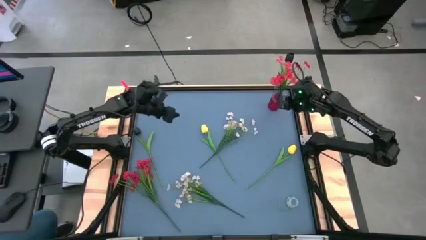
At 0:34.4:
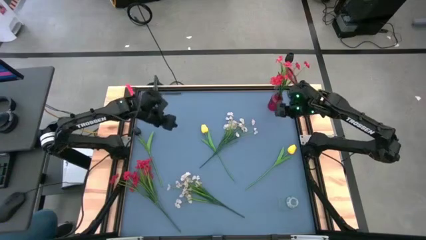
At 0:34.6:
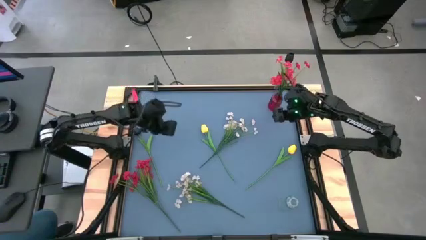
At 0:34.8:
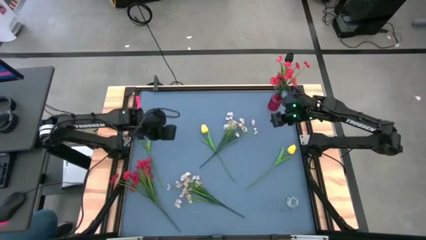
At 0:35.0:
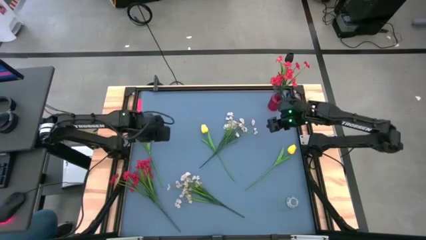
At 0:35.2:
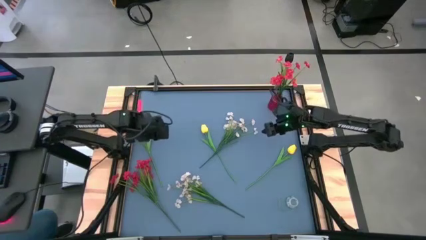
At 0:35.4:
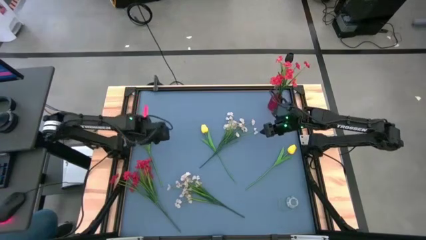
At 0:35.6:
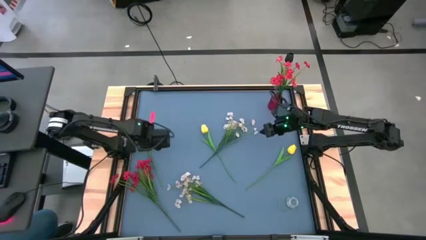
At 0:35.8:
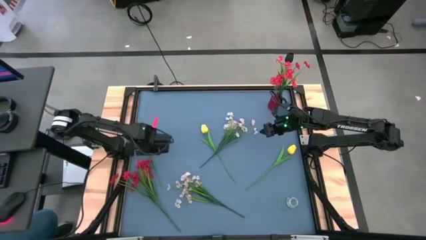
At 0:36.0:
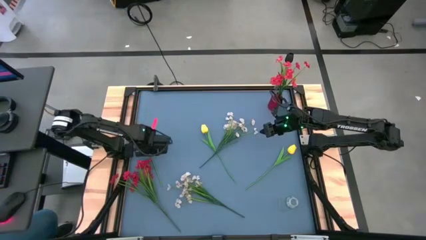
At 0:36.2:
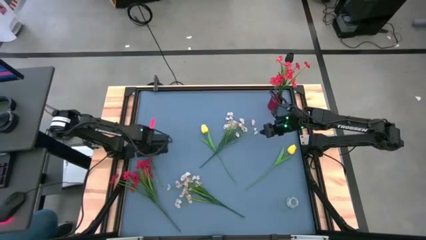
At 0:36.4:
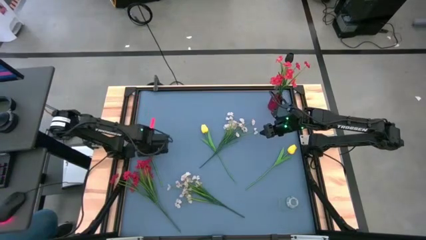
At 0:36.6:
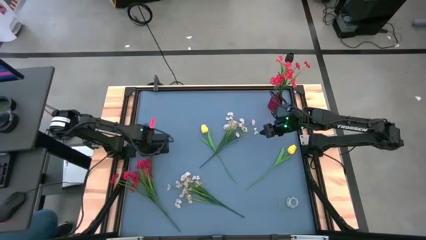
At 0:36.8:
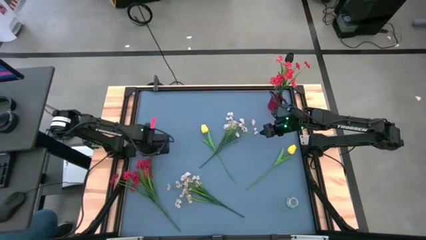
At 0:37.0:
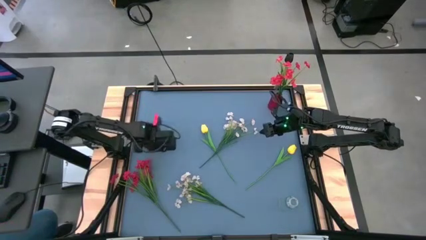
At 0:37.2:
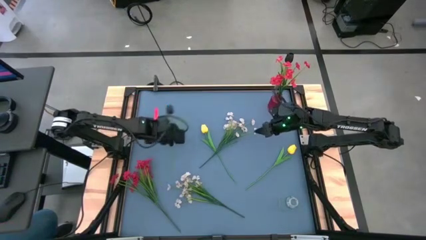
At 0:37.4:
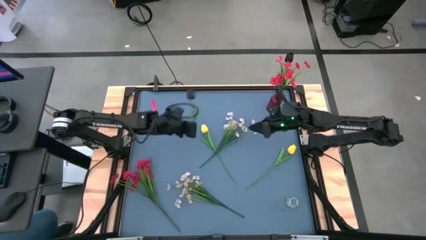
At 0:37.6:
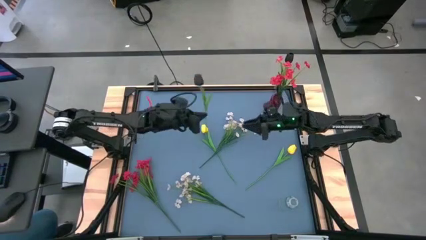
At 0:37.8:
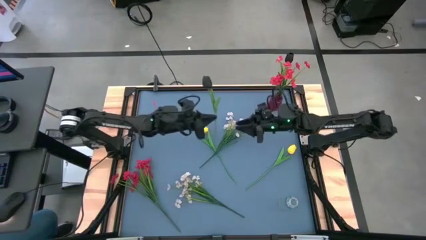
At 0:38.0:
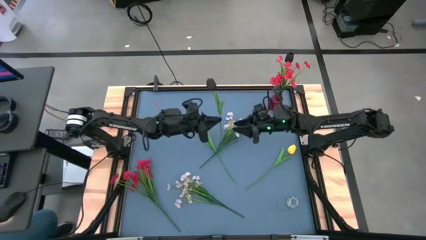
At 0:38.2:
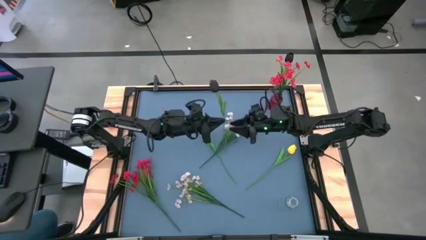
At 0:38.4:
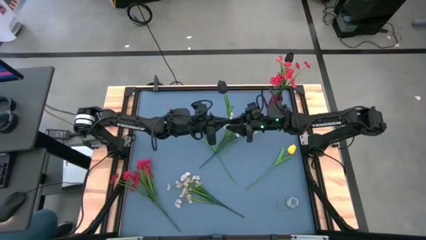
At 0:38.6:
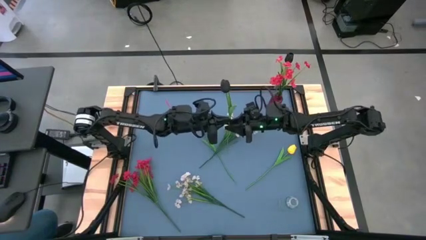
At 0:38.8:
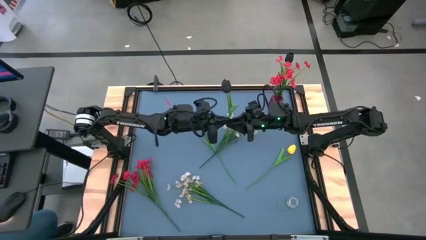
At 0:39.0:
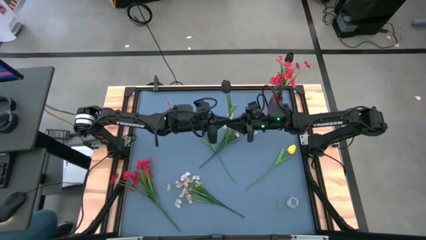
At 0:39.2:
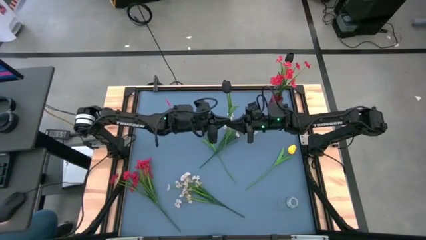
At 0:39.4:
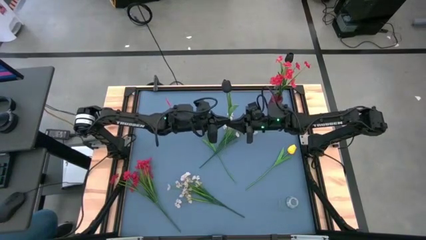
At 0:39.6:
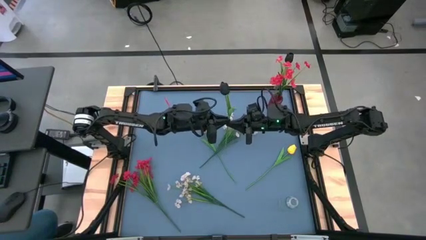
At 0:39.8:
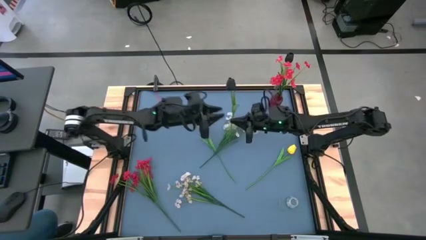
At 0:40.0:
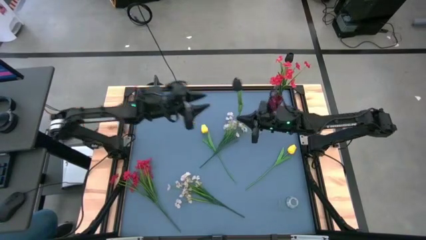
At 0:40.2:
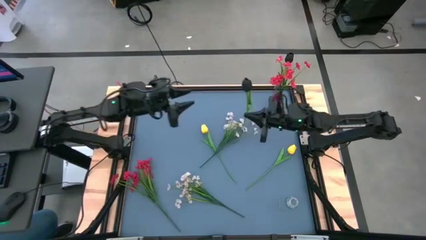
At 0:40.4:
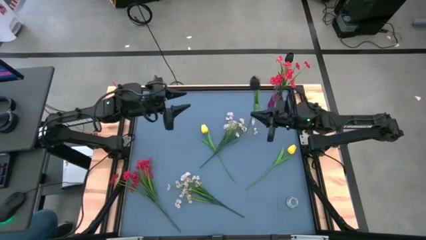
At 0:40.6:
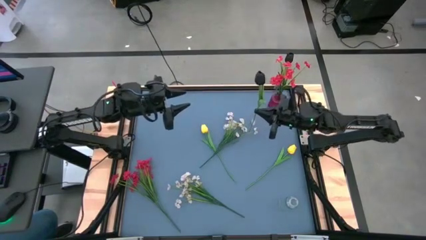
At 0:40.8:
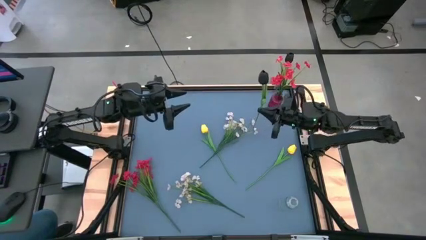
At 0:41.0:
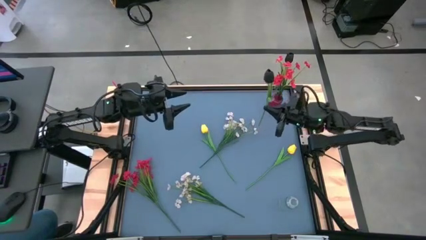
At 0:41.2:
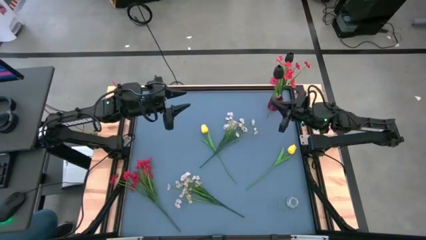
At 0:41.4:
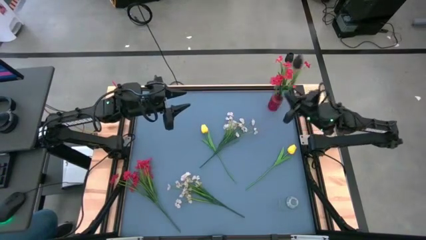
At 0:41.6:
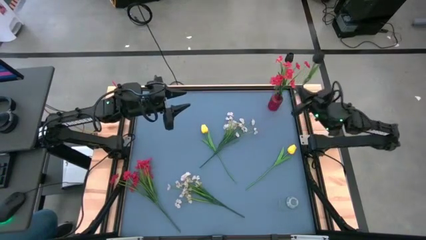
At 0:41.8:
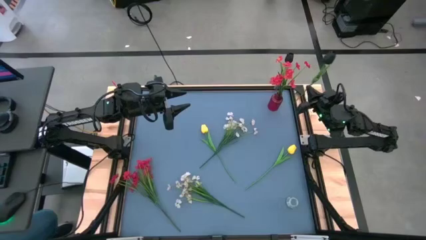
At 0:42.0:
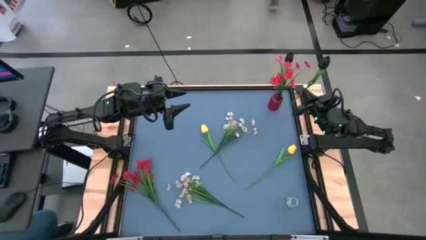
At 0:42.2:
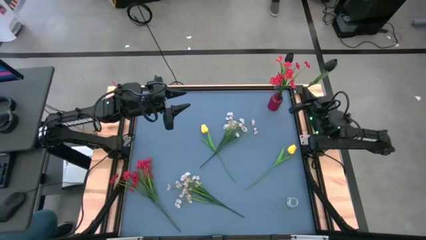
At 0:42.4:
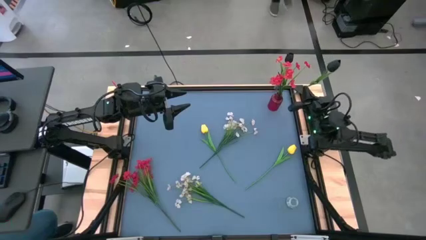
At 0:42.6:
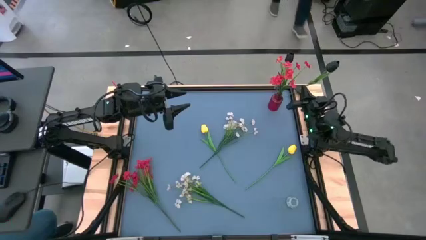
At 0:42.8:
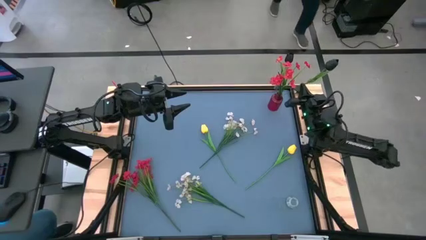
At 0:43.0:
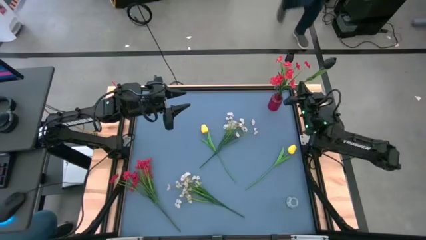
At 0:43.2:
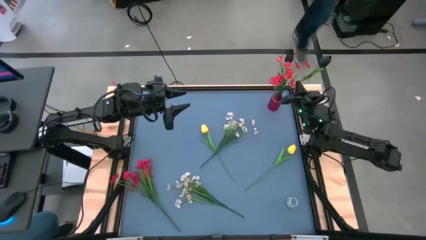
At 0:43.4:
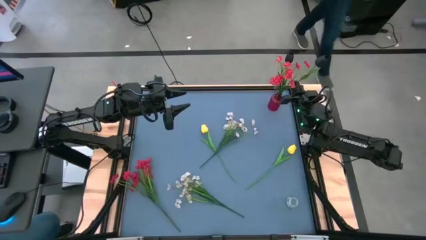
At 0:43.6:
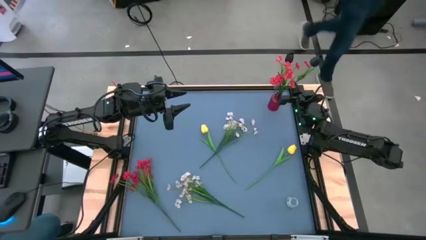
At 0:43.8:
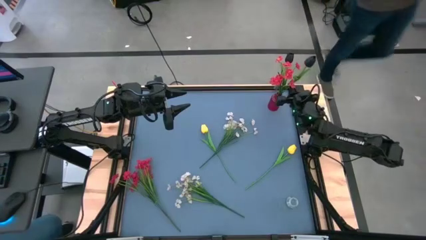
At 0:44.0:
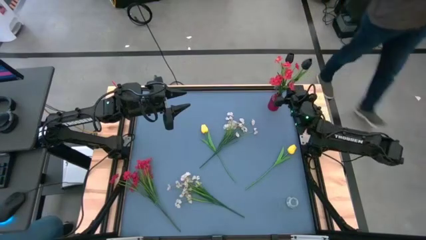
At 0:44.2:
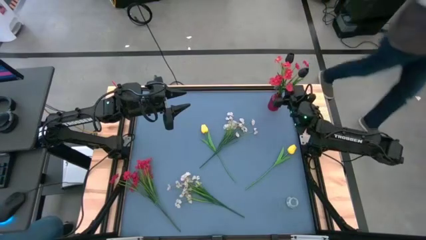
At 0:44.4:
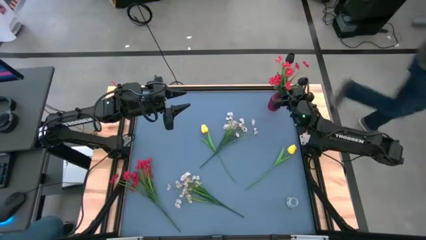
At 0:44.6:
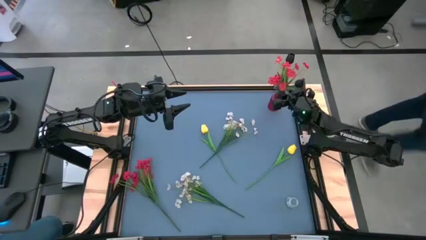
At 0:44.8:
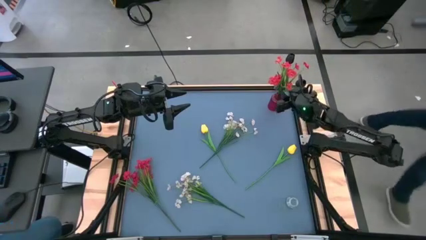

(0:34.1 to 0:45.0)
Task: Sort flowers into vase by color
Put the black tulip into the red glass vase

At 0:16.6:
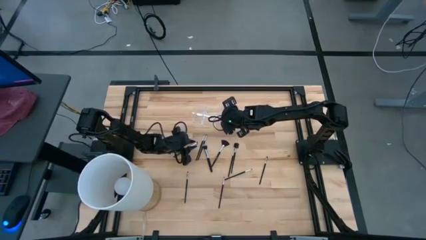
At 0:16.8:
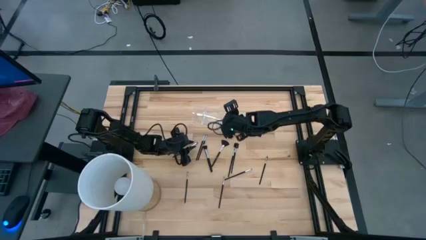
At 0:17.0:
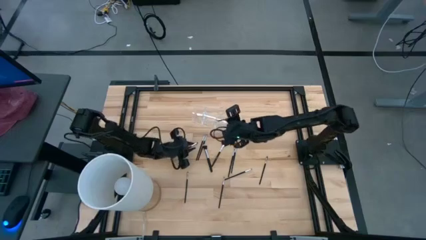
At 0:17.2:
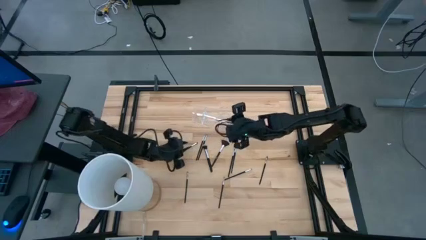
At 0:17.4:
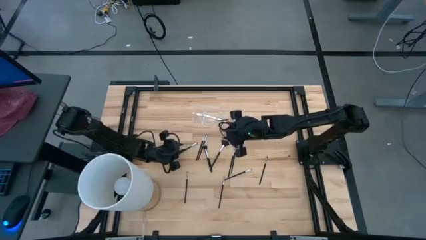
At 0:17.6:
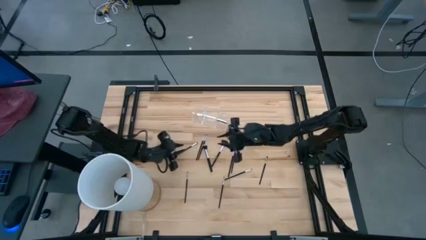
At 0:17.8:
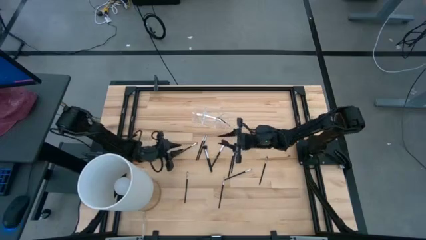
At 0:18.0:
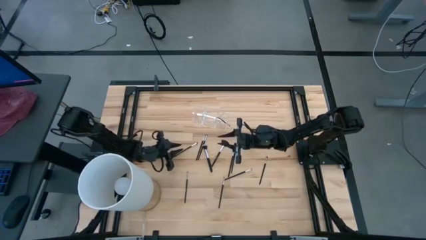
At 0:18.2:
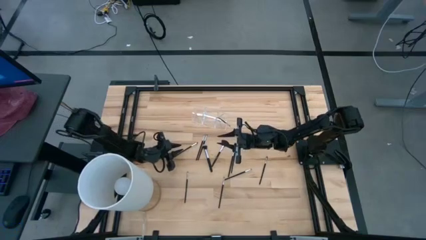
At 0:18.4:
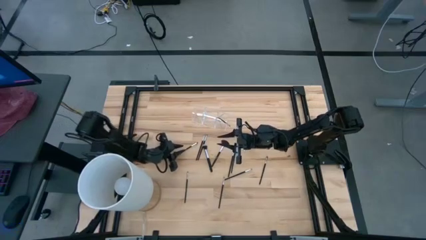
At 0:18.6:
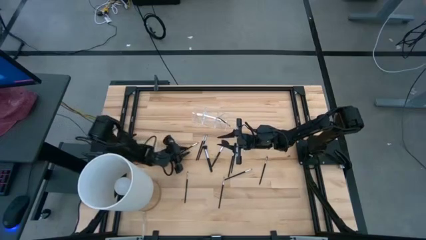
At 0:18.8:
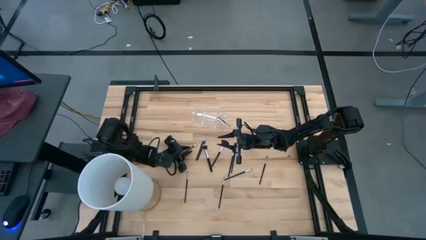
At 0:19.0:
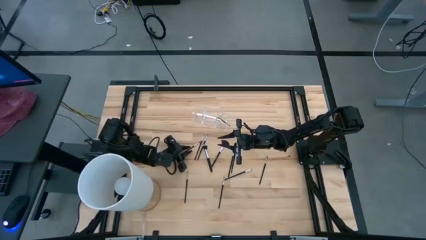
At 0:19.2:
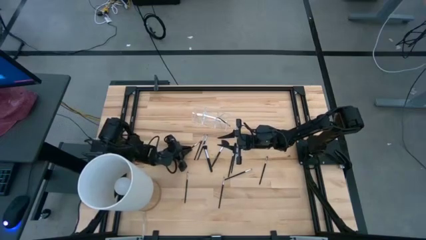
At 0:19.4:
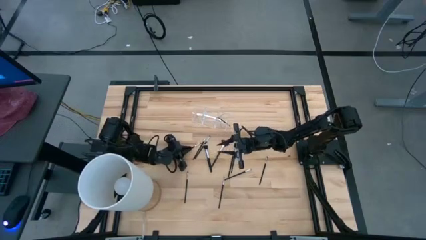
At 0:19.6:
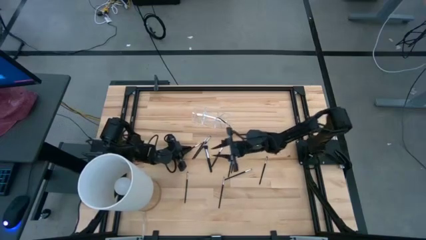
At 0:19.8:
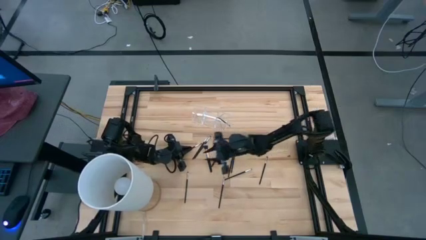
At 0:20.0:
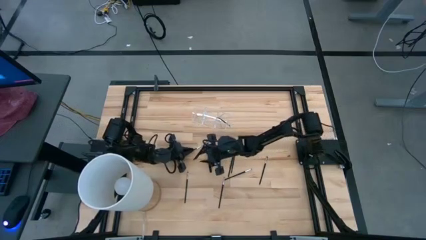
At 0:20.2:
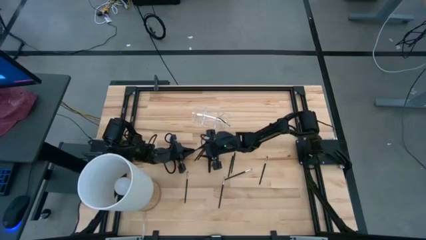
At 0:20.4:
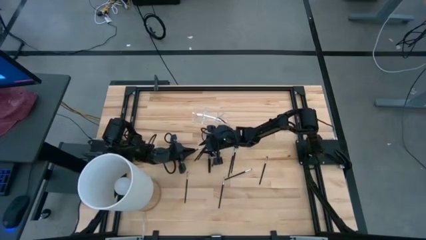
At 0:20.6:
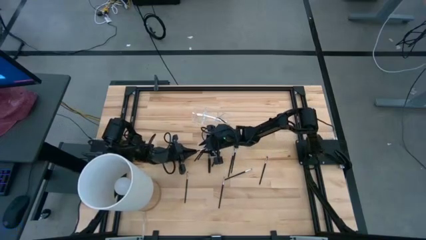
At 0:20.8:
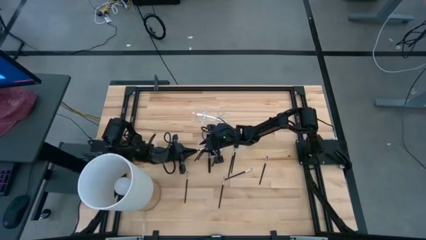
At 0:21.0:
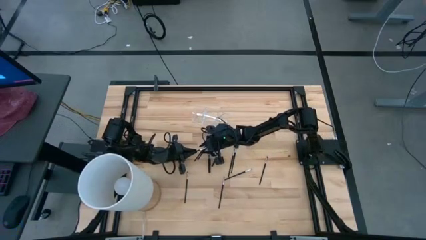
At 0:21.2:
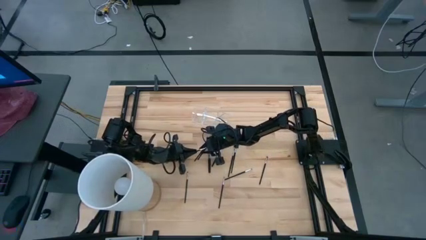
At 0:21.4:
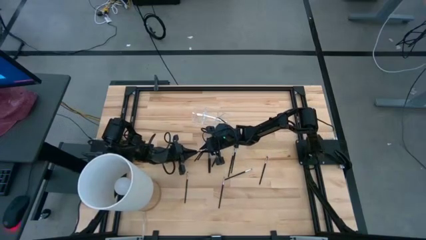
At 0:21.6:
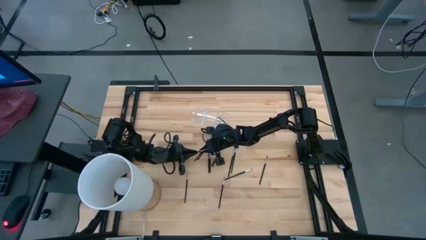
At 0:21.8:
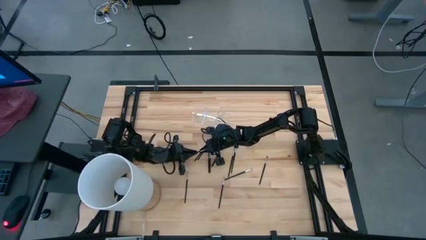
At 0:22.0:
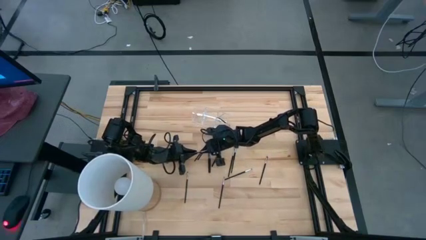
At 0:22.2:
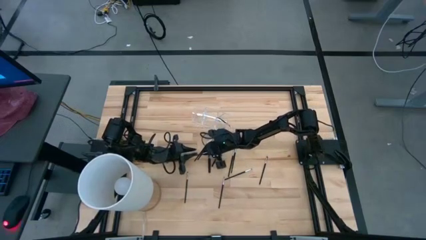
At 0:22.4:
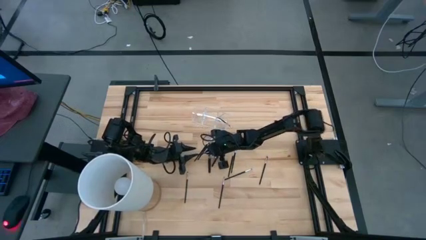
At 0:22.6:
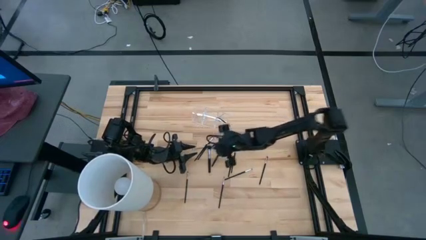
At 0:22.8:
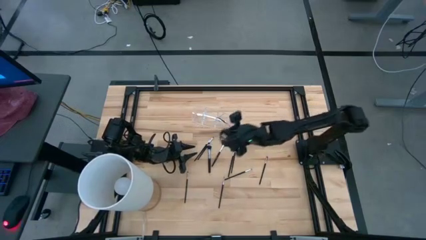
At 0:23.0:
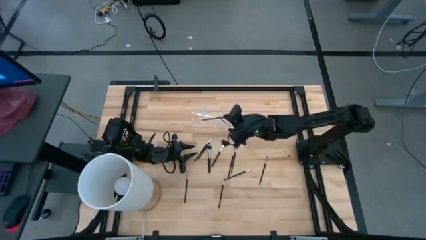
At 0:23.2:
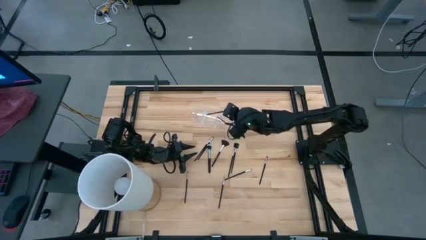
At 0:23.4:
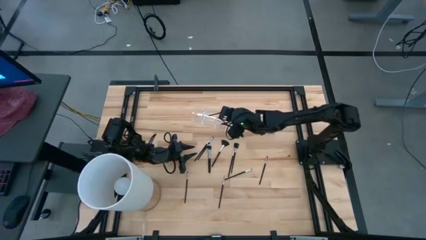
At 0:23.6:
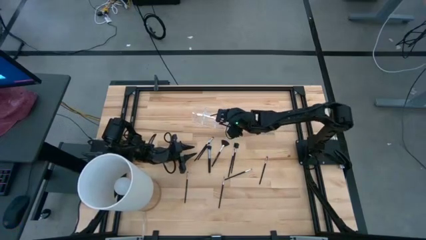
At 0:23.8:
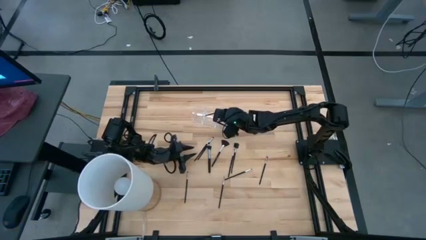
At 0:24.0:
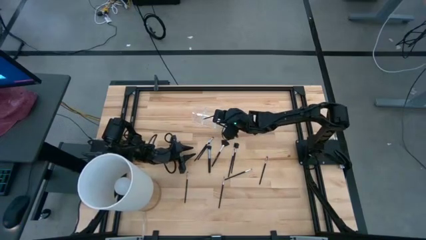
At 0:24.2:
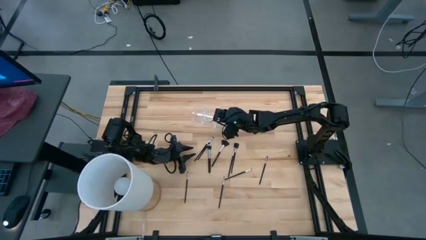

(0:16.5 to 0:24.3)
Task: Put items in baskets/containers
Put the black eyeshadow brush into the transparent organizer
